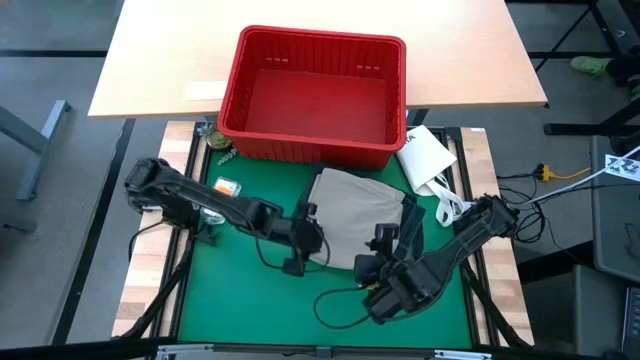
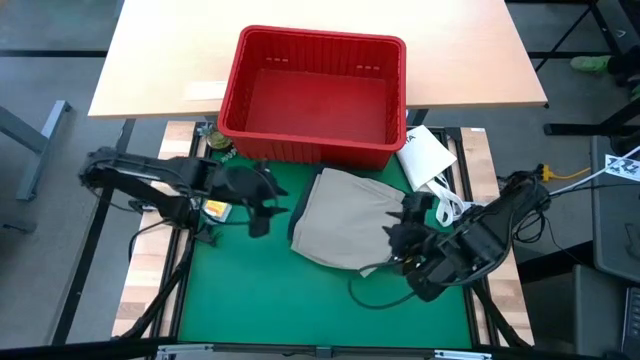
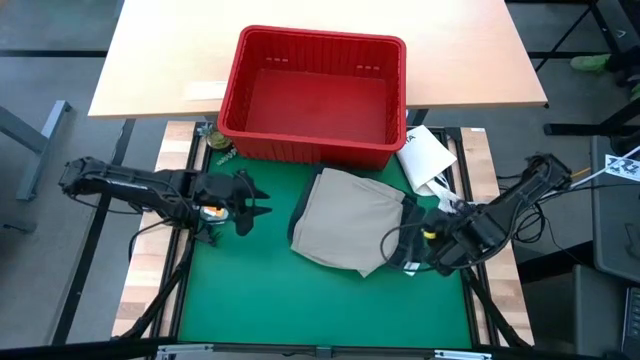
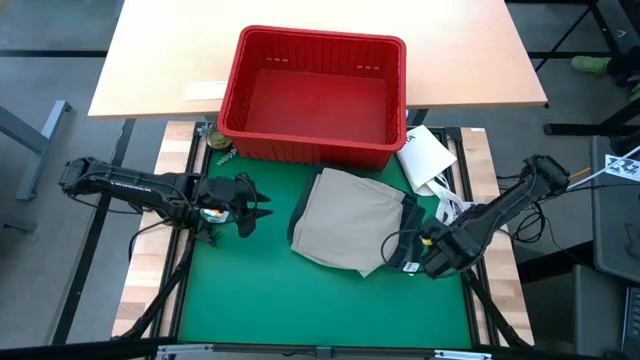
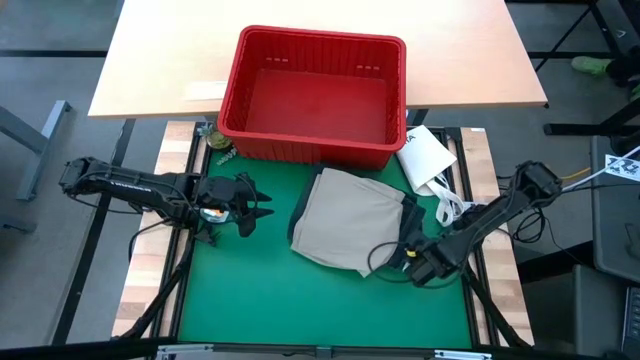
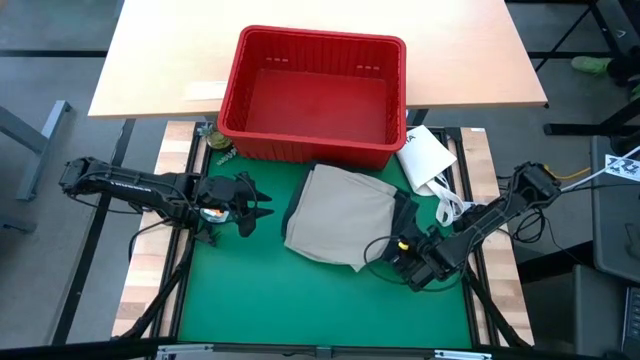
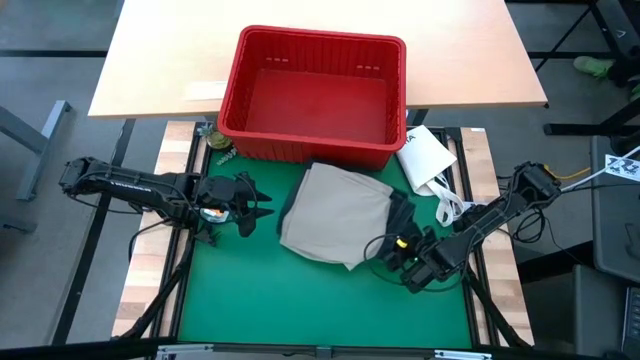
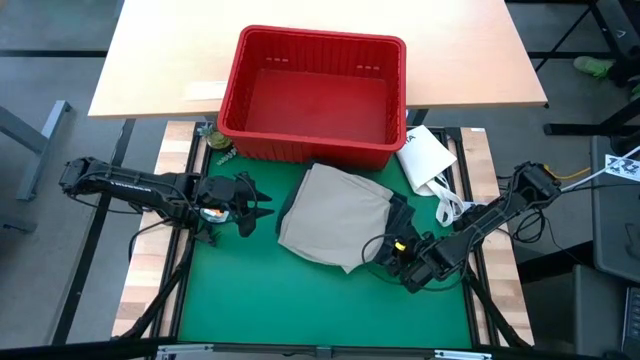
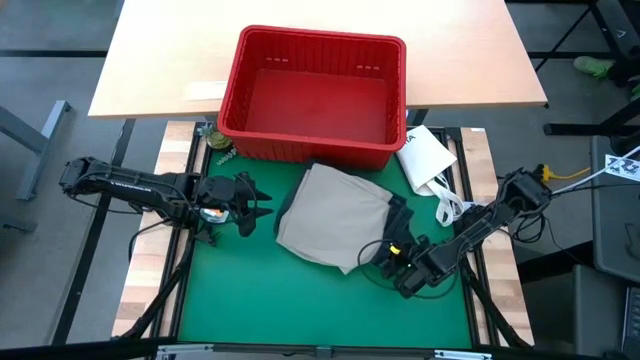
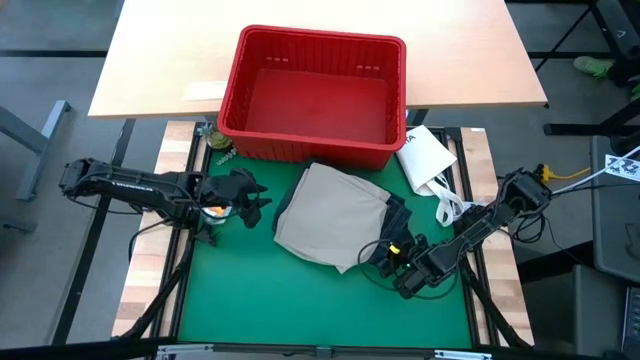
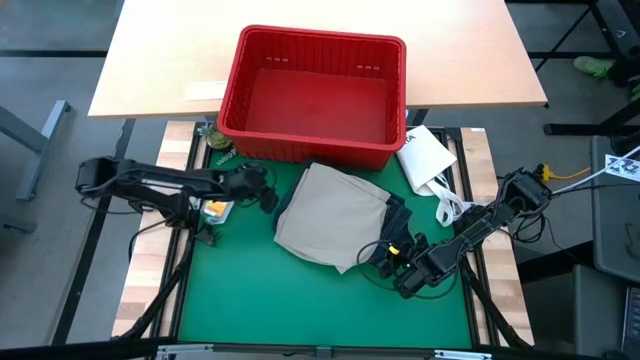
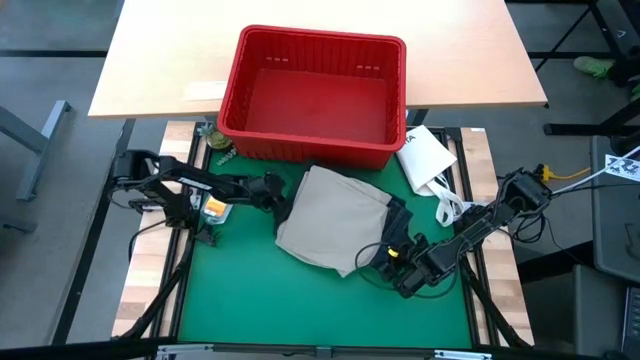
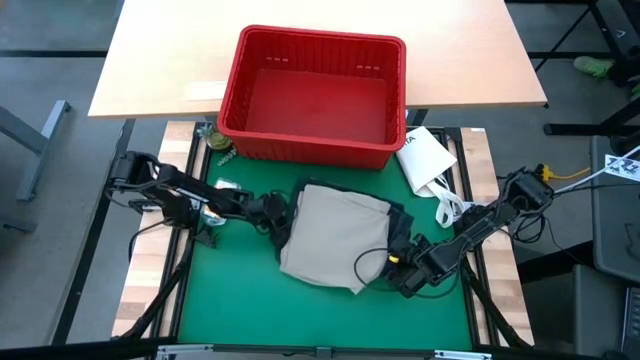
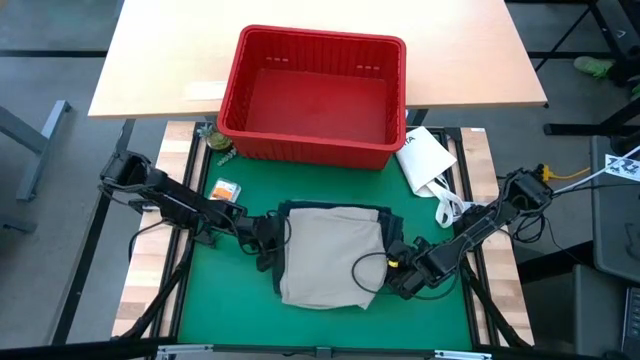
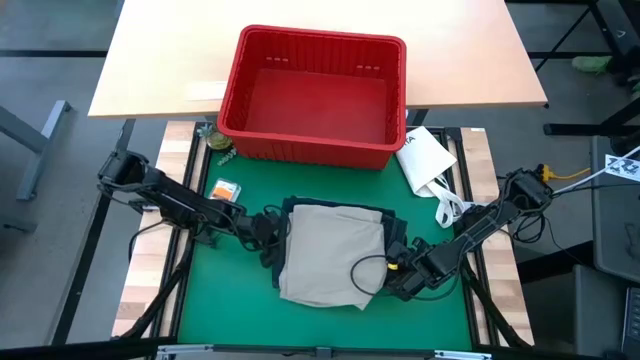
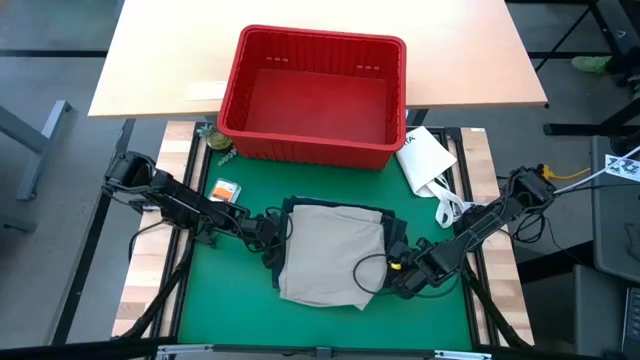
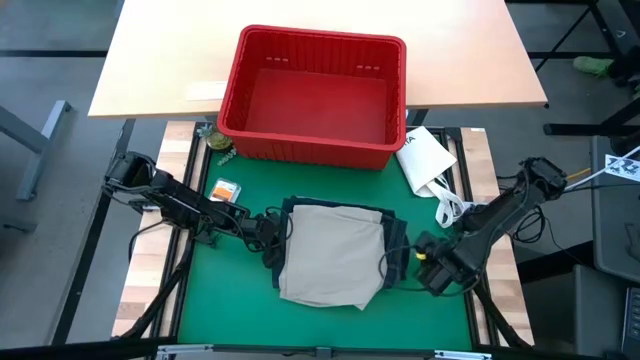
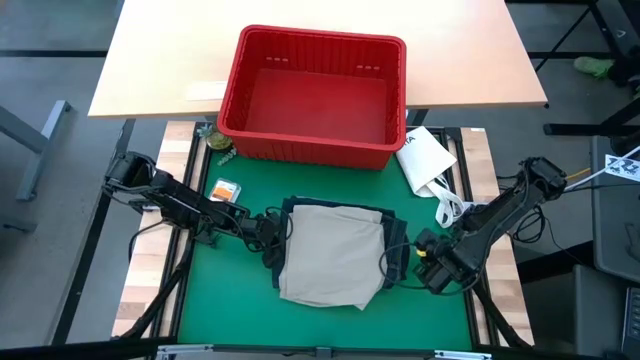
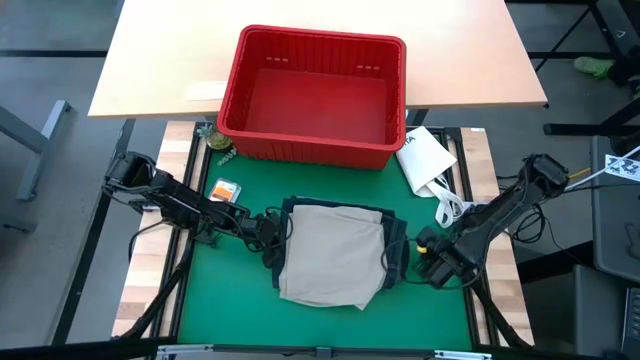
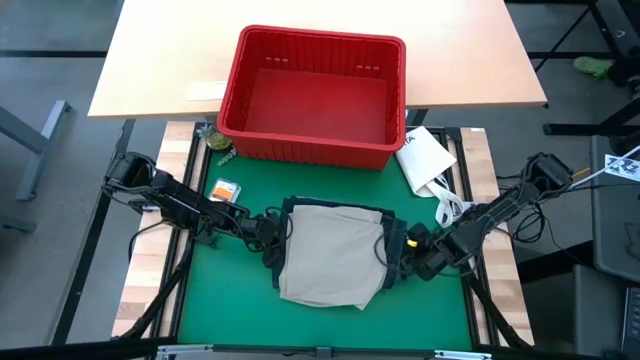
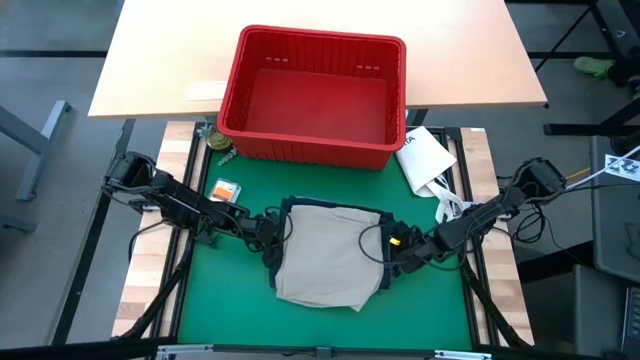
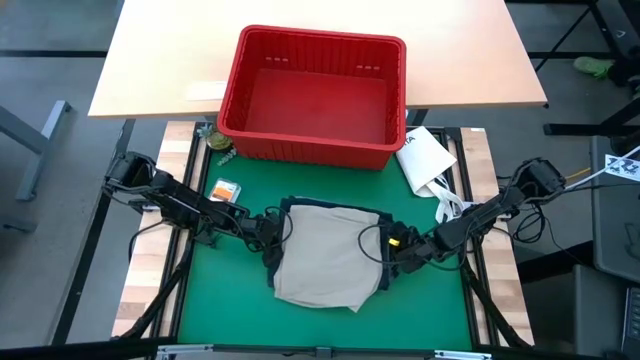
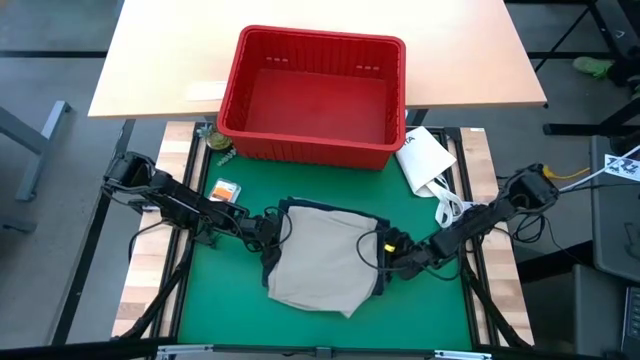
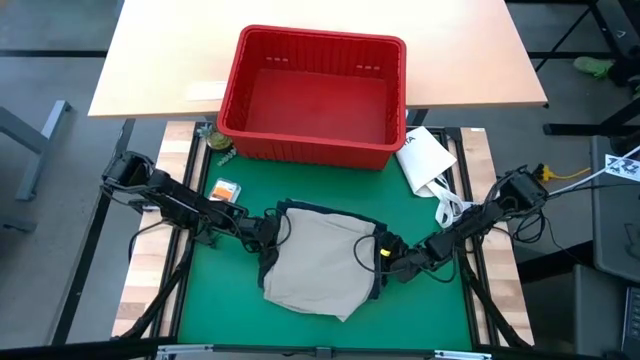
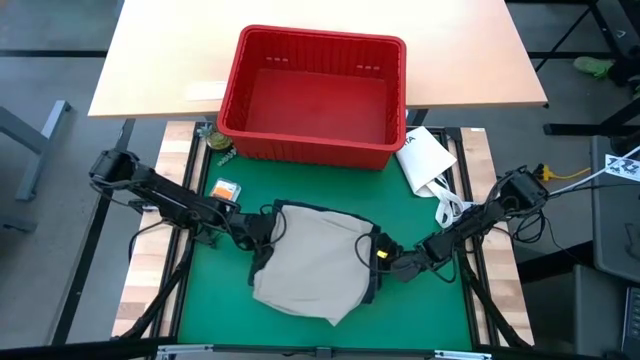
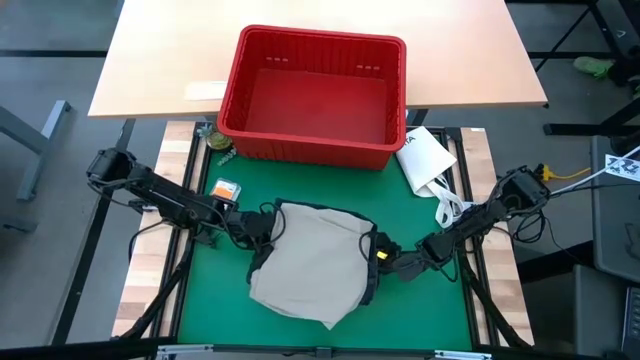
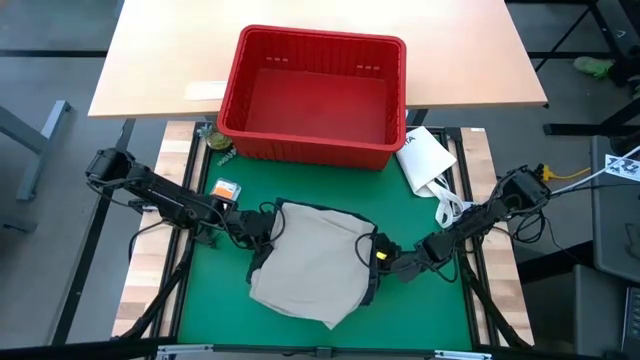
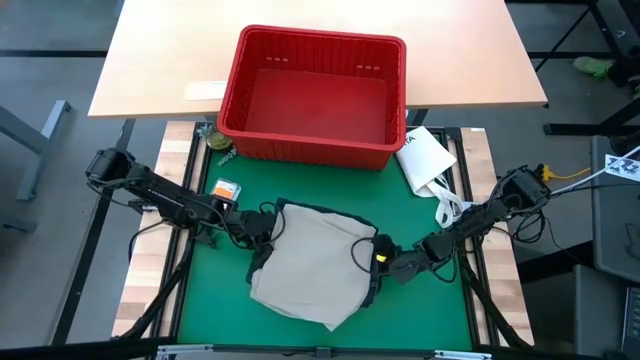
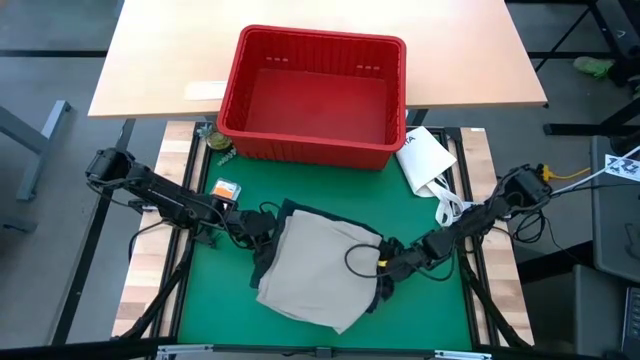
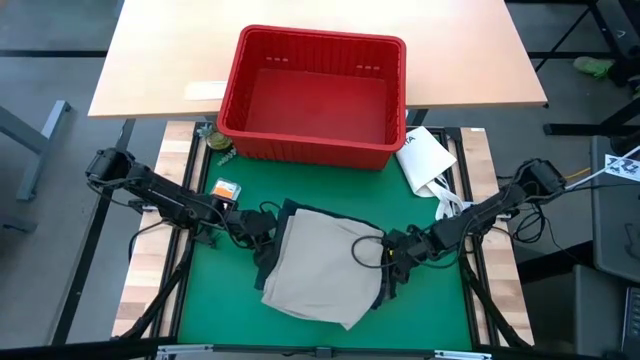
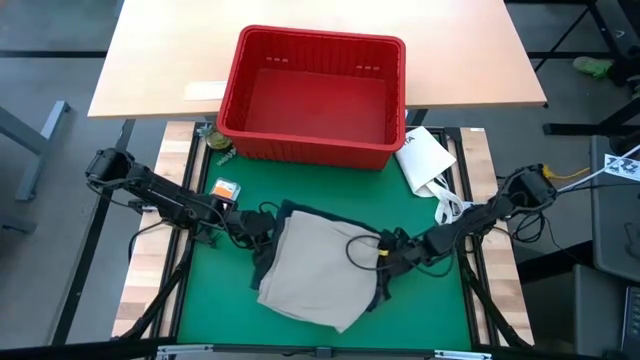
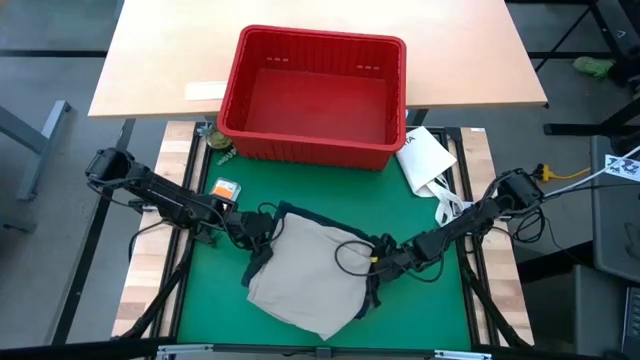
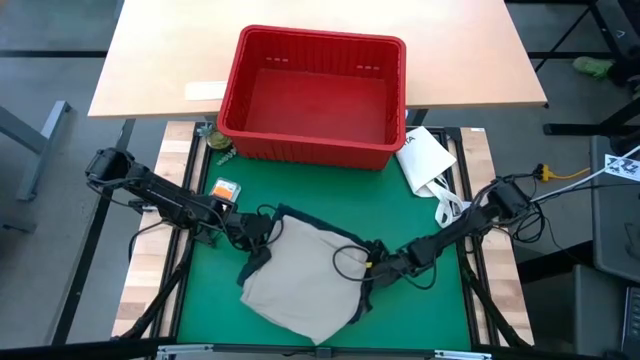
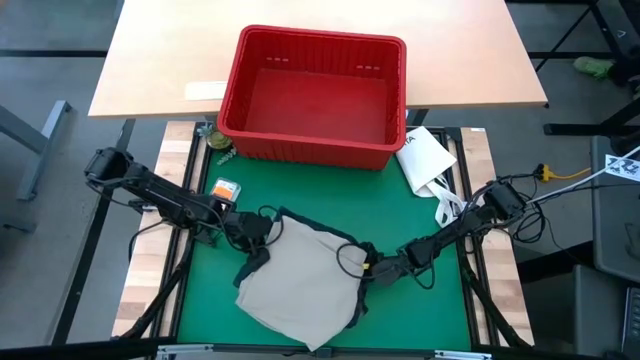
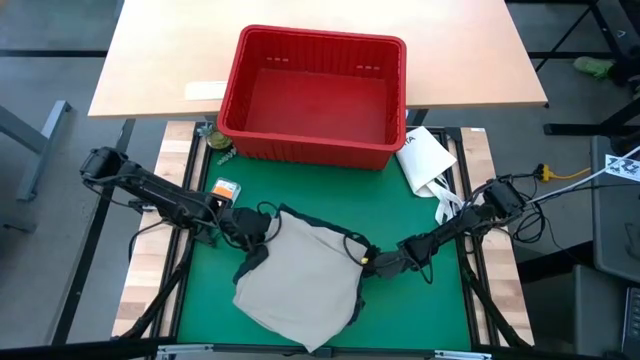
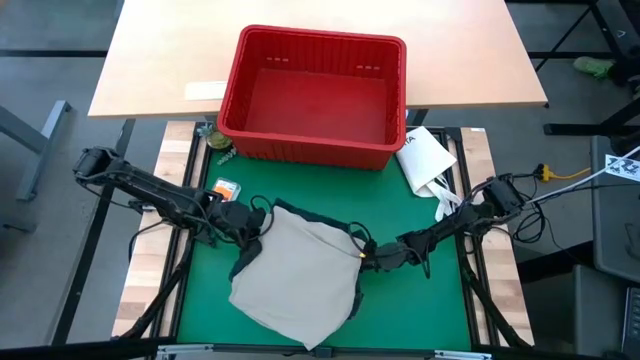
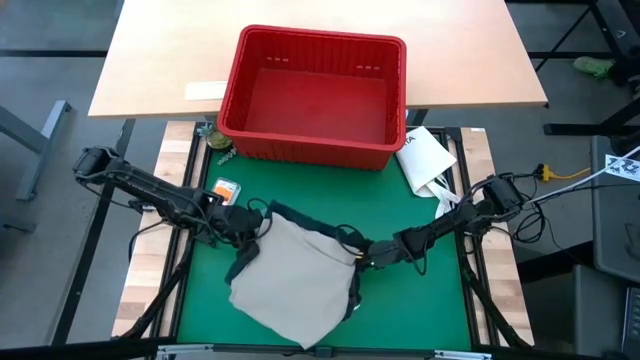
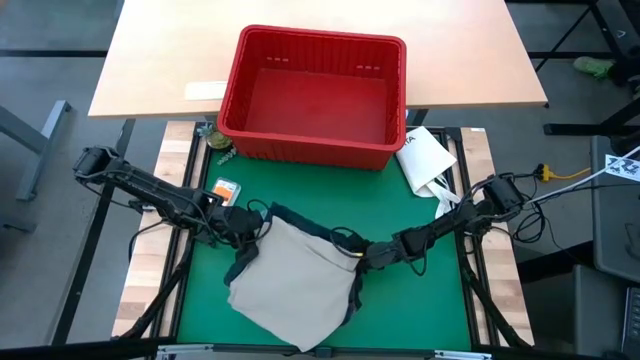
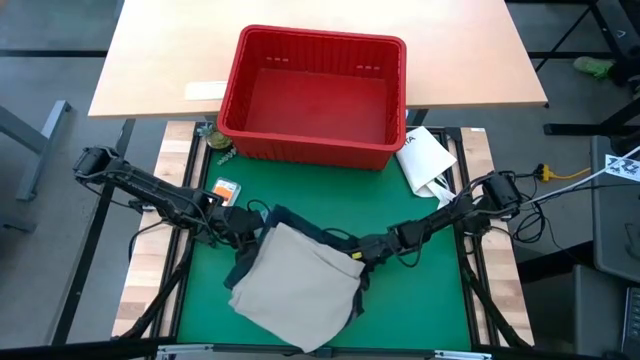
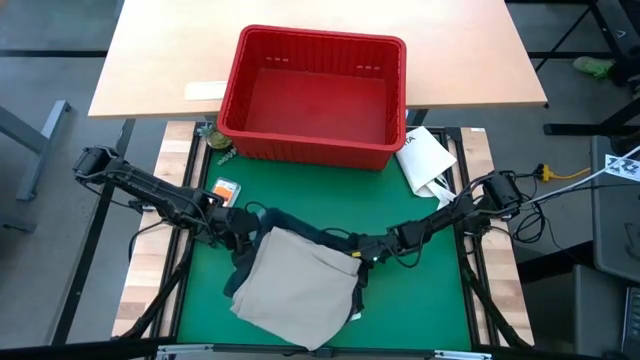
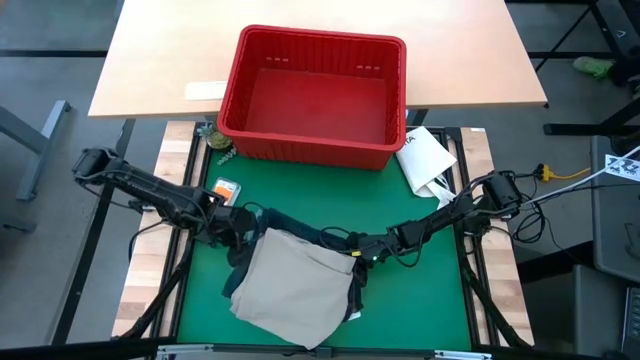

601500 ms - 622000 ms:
Task: Fold Laundry from Bin
Put the stacked of clothes into red bin

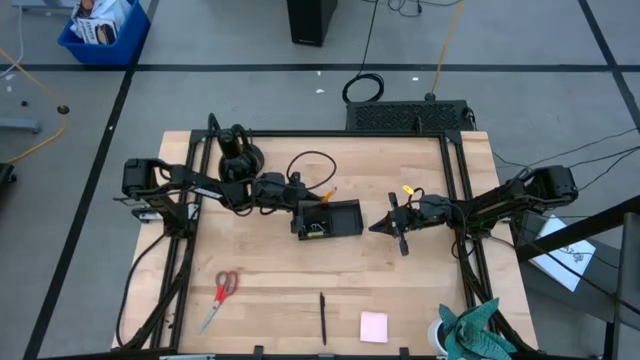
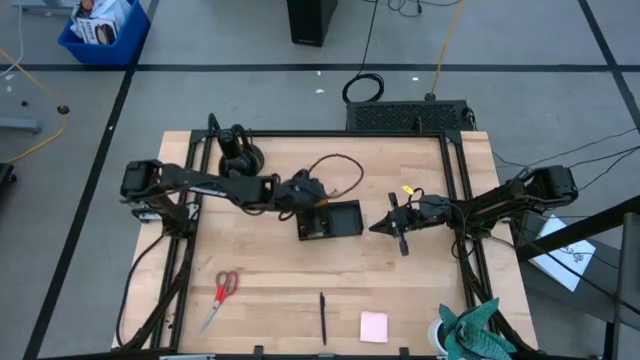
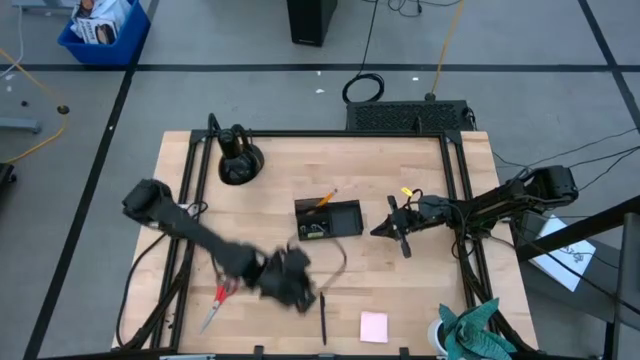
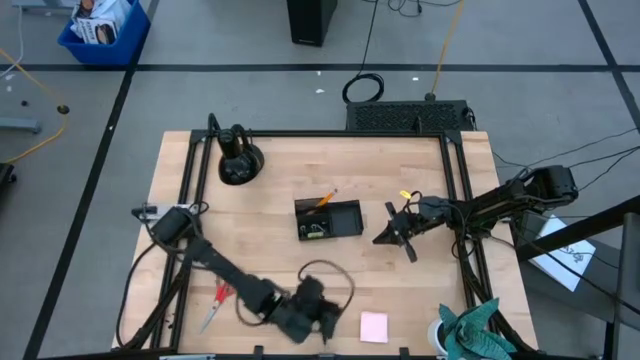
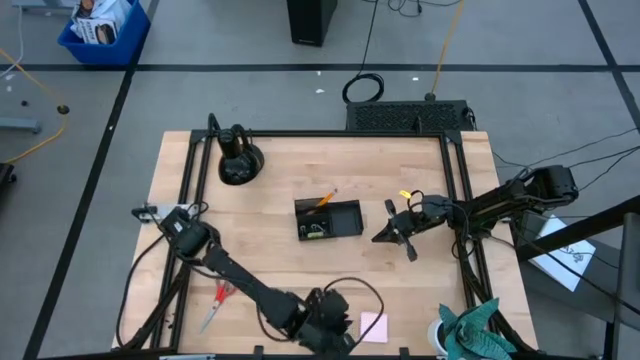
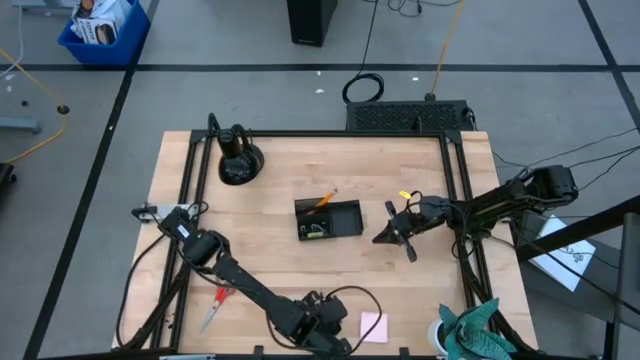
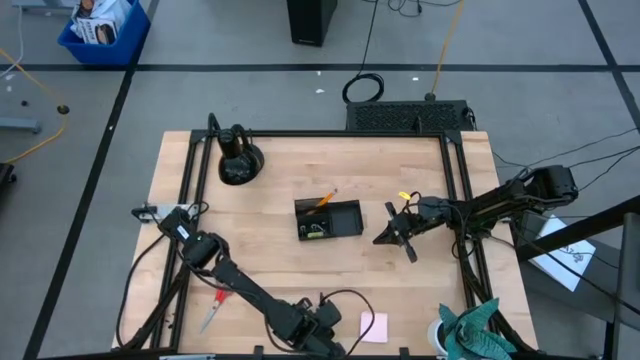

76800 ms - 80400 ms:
Task: Pick and place office supplies into organizer
Put the black pen into the black desk organizer
